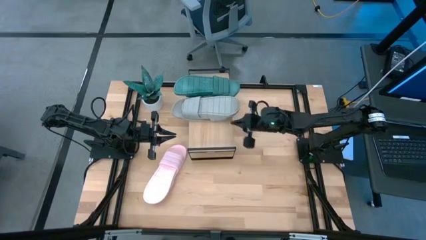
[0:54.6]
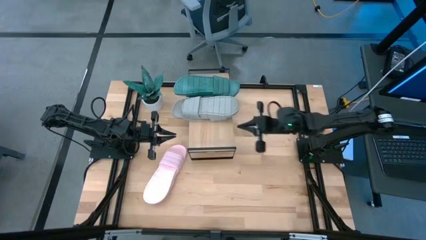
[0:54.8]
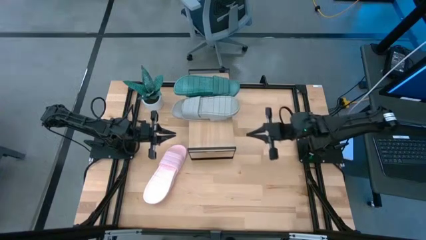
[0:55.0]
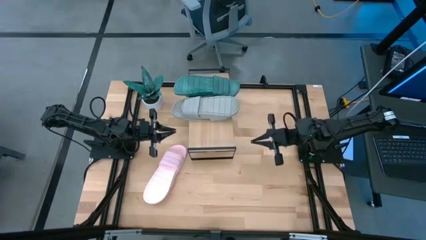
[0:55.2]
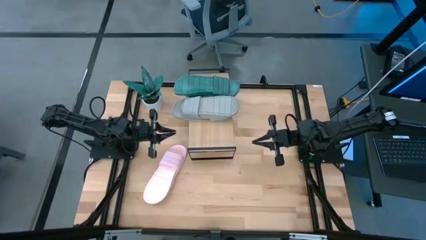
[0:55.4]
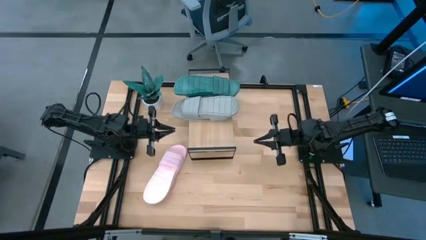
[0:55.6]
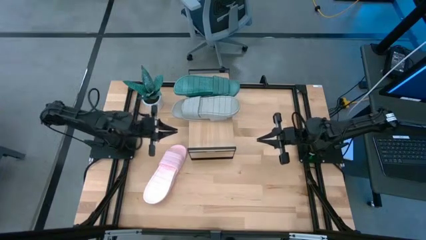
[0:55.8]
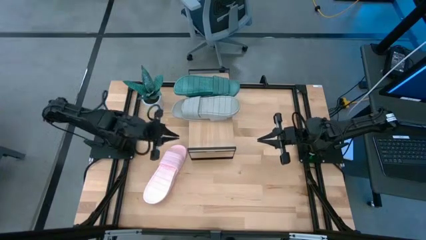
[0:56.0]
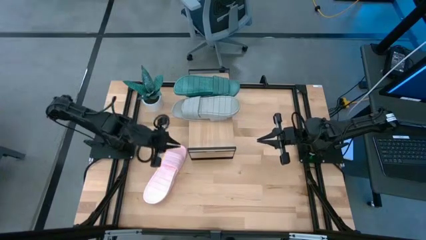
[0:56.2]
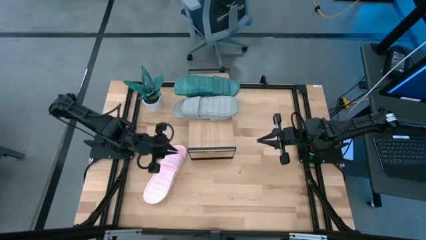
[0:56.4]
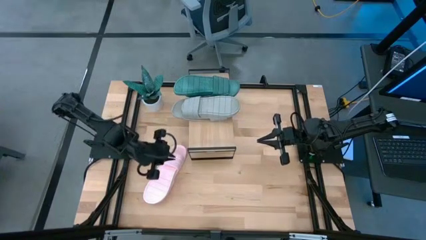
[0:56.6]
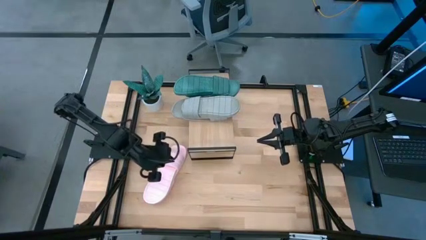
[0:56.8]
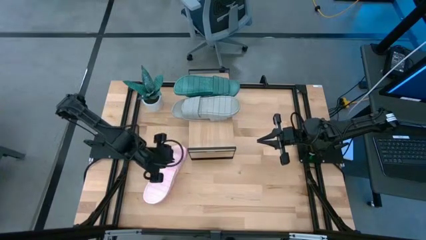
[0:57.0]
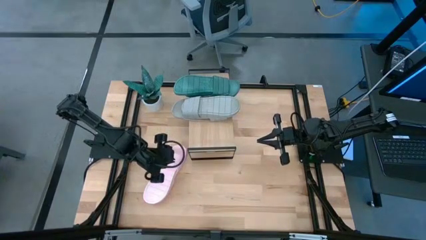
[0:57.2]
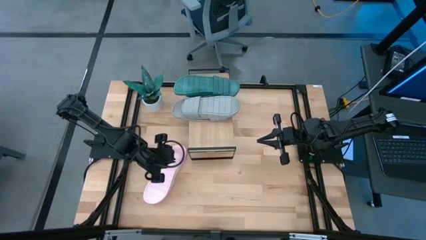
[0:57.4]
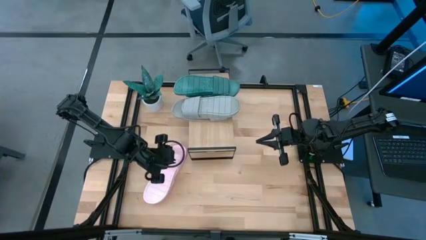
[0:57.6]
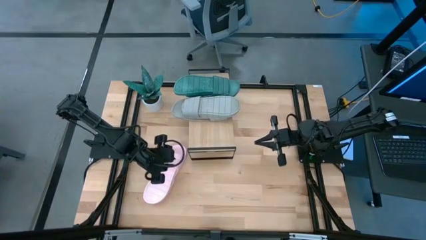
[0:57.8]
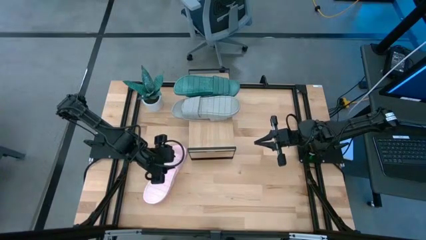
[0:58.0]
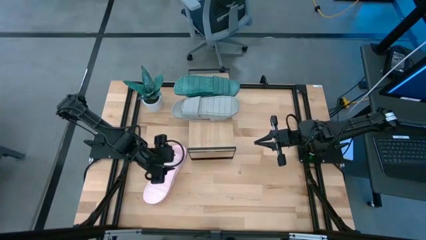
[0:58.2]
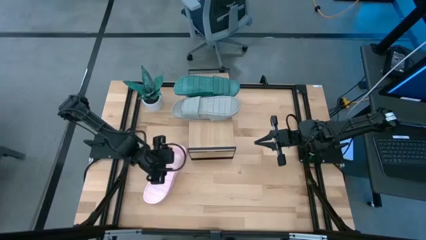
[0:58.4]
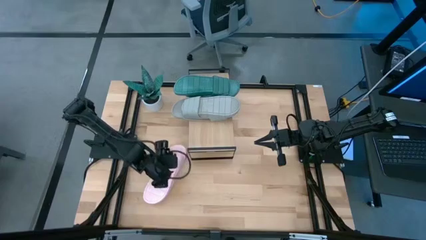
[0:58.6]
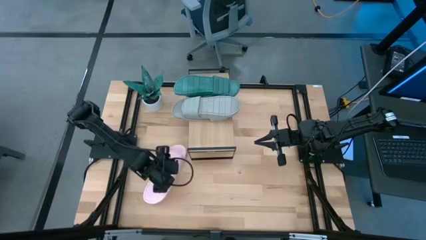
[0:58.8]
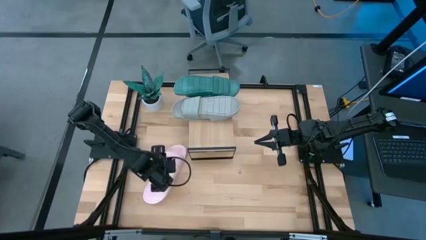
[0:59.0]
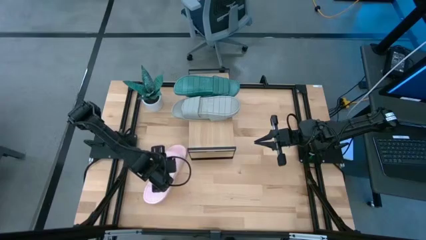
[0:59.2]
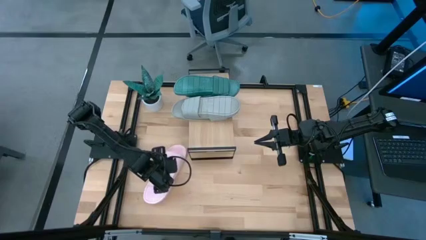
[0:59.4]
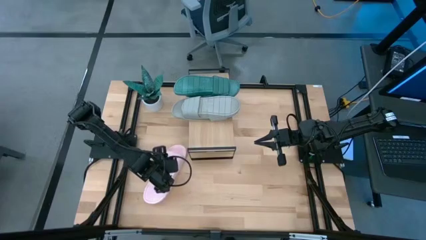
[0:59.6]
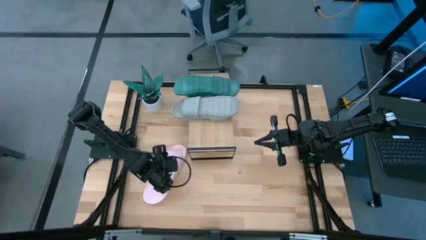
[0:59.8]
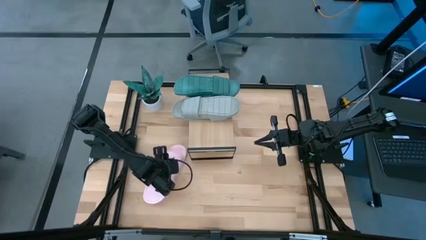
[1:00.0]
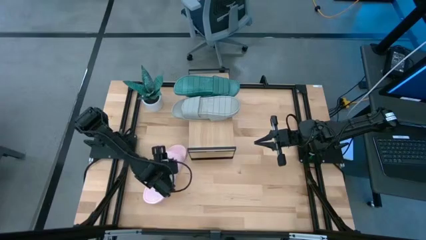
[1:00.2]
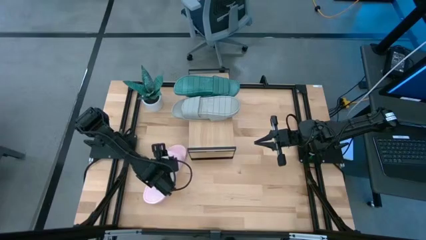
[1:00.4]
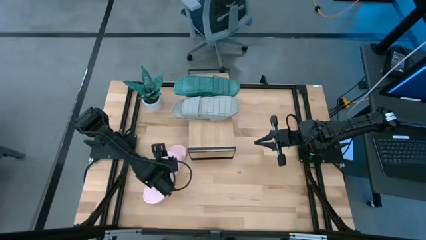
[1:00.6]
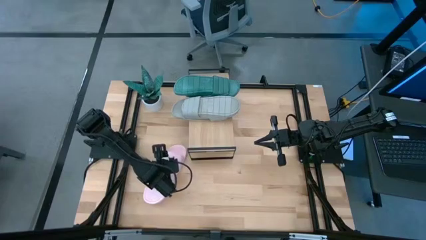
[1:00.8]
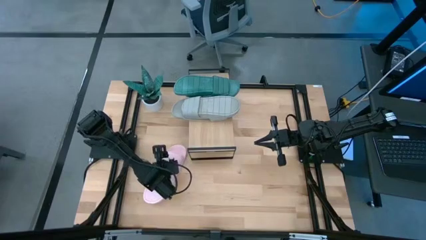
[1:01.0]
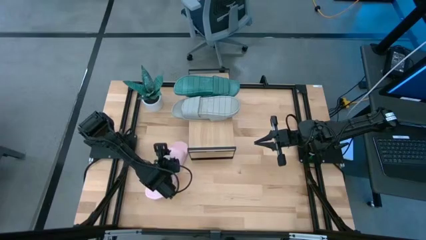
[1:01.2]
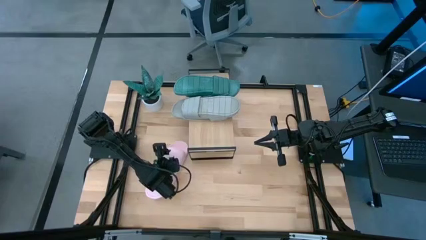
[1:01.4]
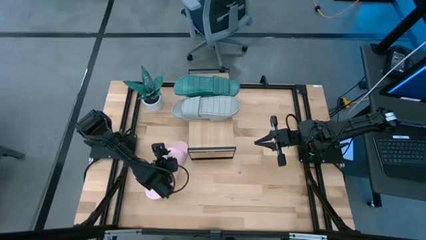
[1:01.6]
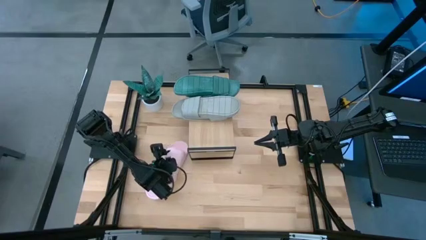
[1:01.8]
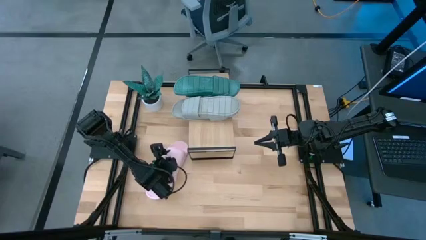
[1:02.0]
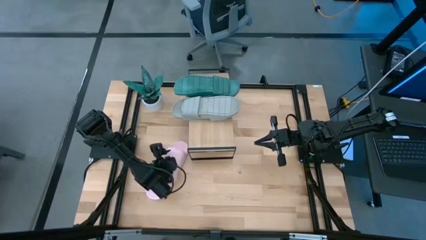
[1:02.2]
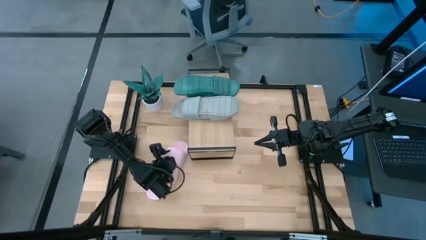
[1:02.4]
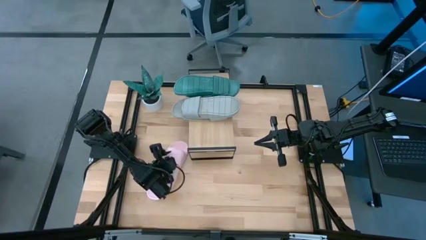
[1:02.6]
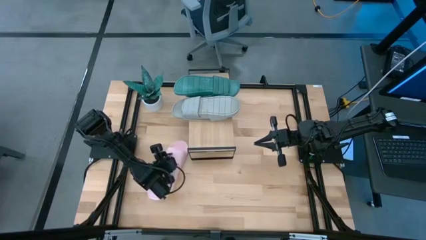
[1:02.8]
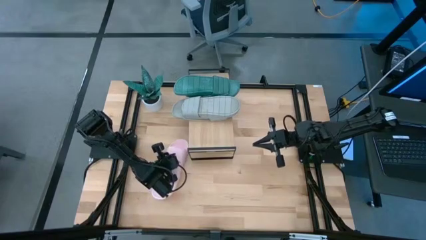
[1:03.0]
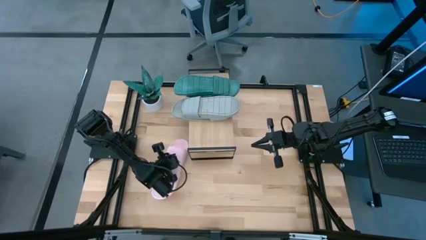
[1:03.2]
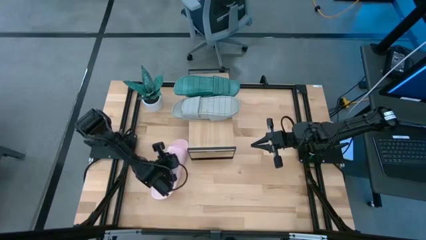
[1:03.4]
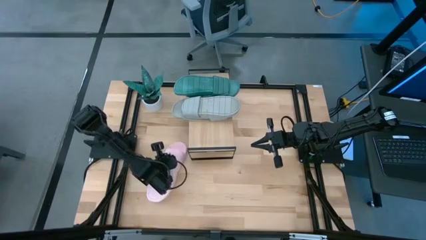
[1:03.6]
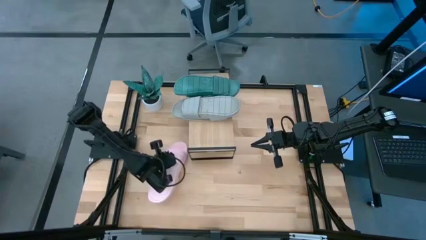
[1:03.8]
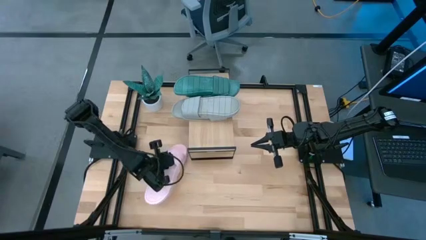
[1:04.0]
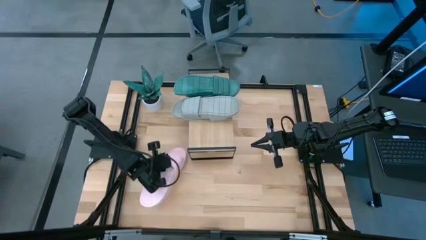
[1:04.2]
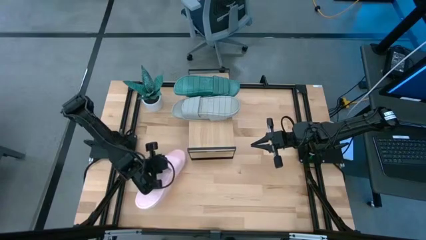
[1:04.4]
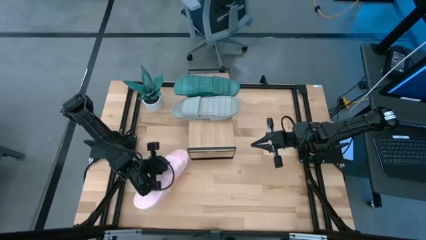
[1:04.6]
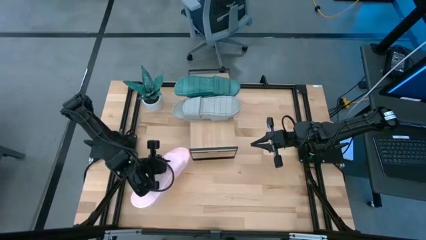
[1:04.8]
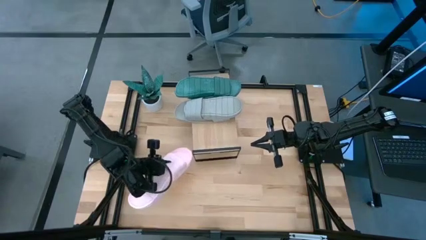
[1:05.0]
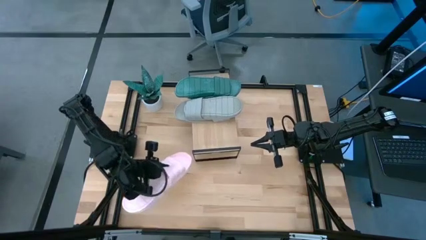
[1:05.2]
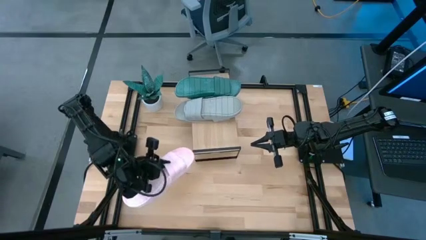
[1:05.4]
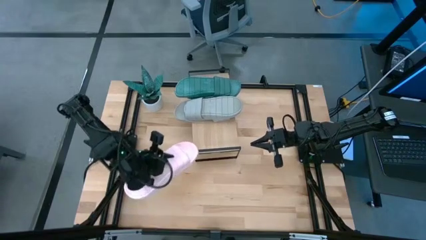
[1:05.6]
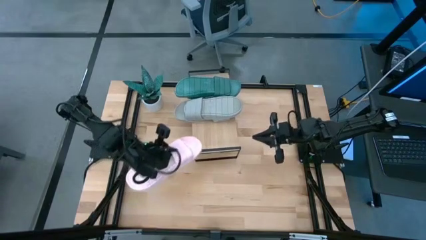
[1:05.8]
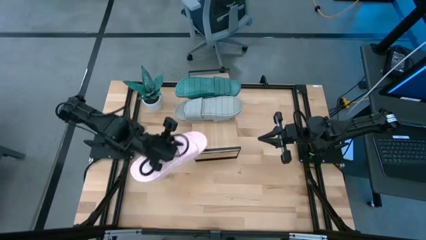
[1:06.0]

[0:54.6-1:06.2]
Task: Pick and place slippers onto the shelf
Put the pink pair of slippers on the shelf
